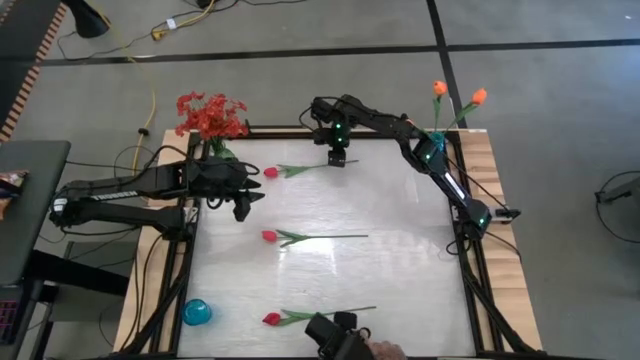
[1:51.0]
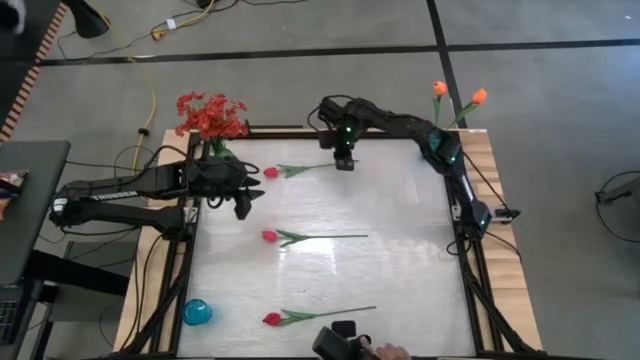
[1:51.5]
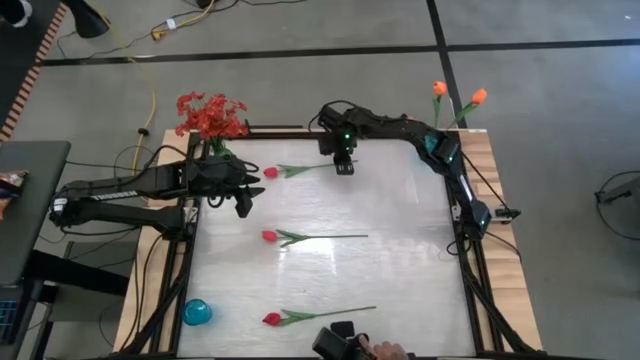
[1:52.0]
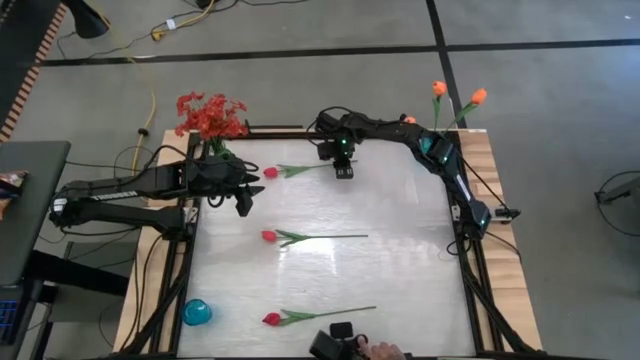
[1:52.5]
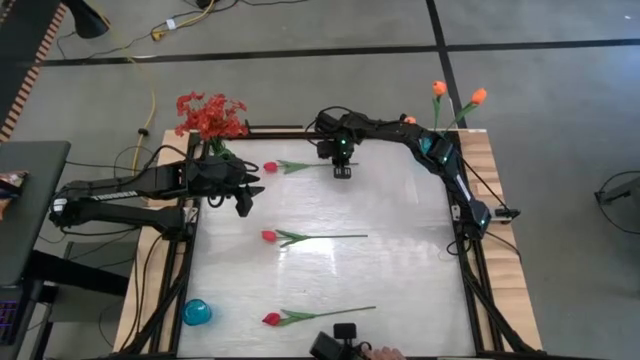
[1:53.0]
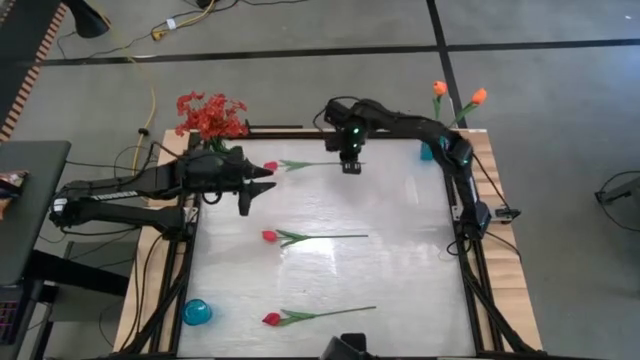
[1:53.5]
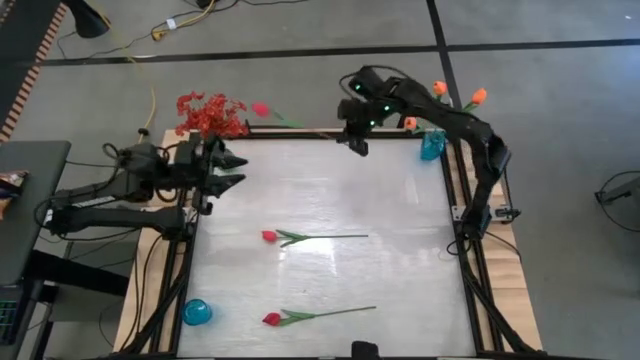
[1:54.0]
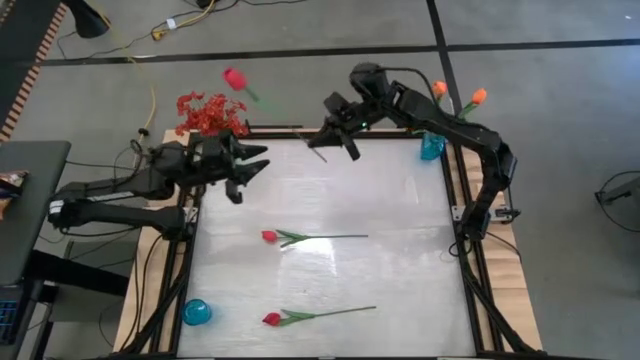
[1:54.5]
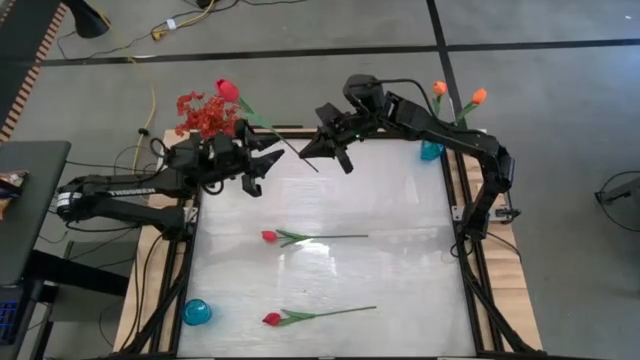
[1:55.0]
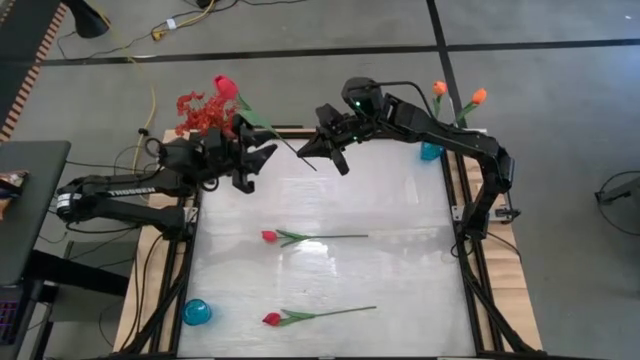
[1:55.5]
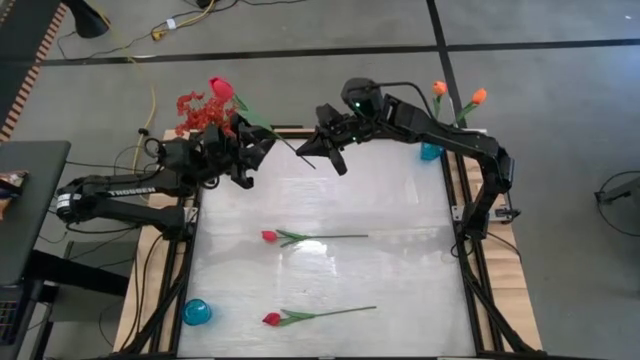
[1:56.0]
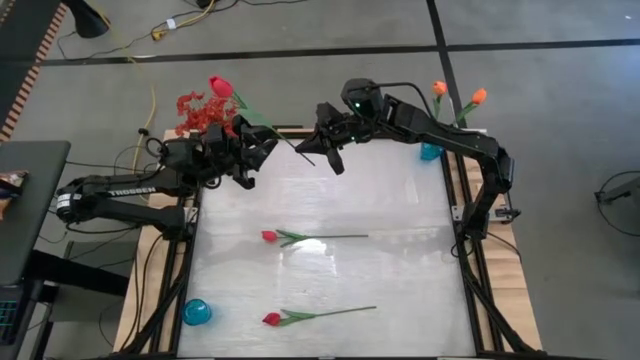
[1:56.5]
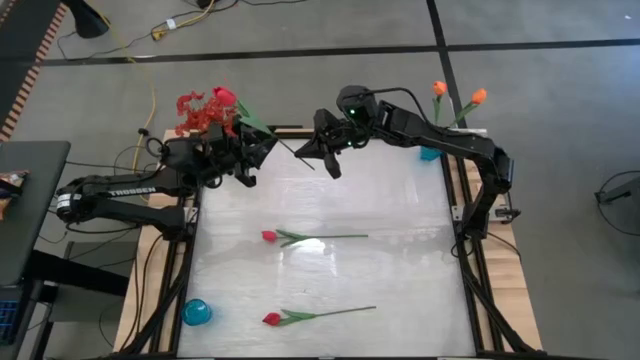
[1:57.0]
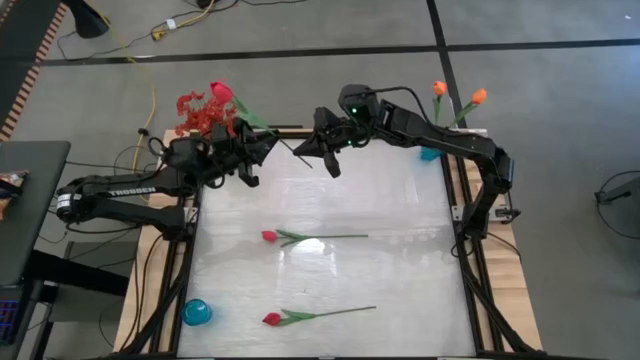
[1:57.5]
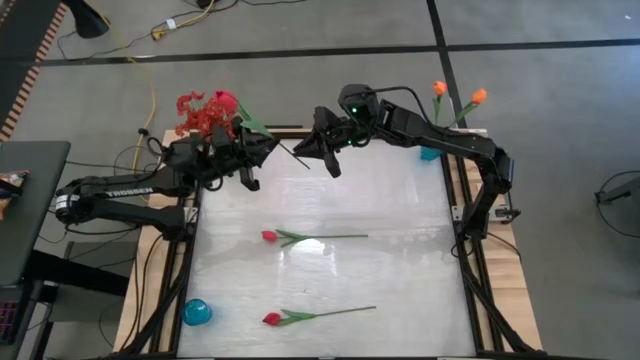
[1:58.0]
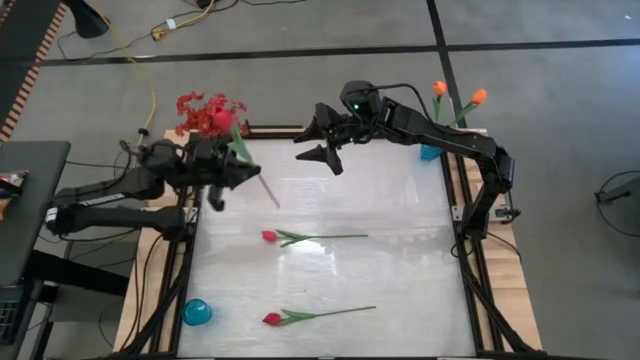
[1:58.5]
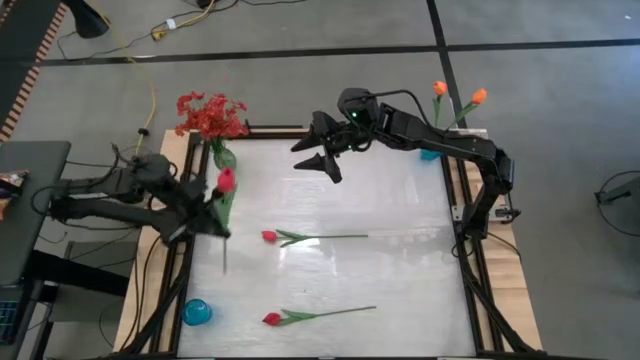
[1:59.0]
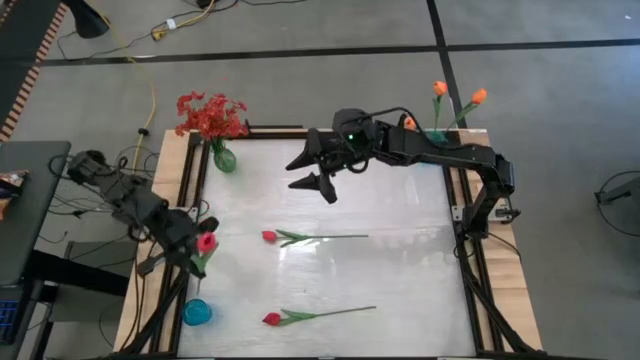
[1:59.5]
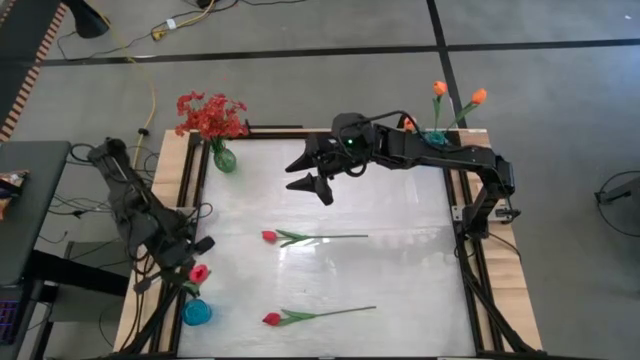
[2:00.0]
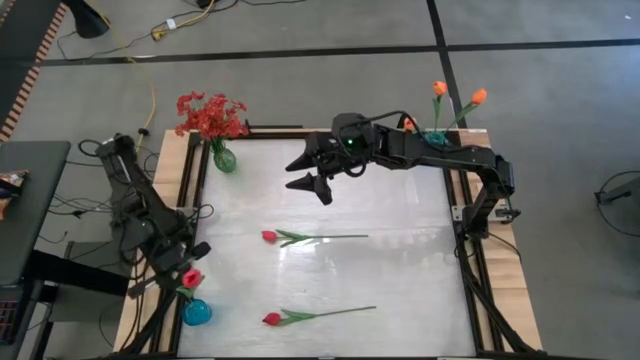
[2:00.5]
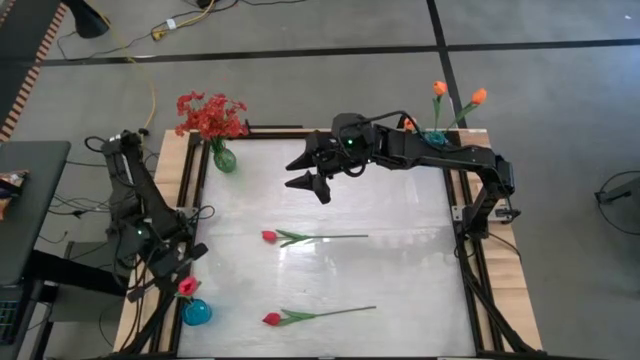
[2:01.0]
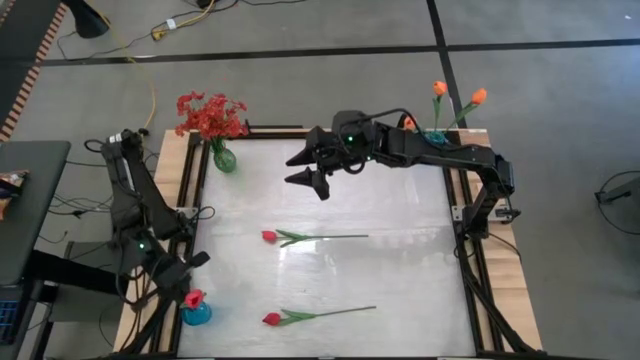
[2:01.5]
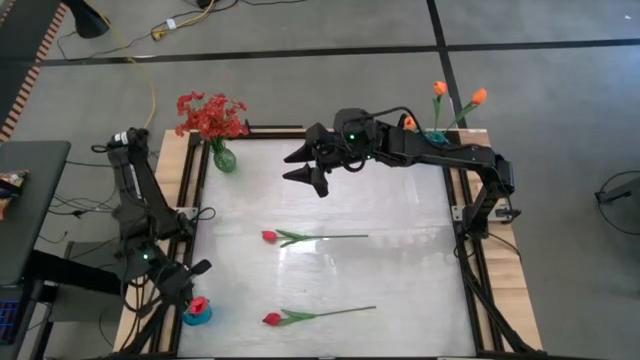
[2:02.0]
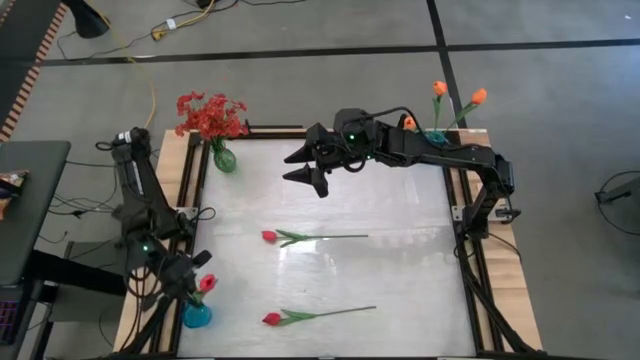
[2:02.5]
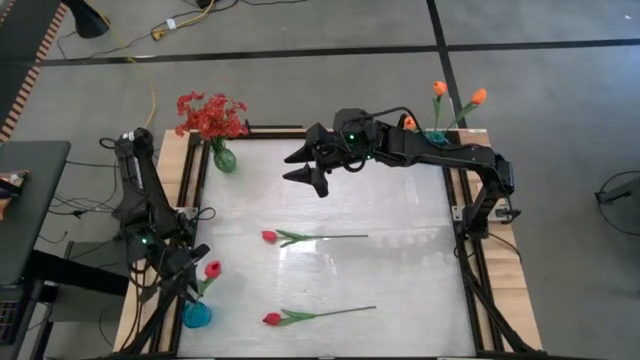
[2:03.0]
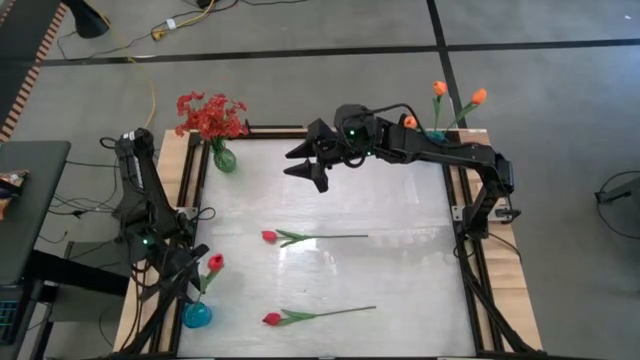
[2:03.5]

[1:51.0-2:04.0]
Task: Sort flowers into vase by color
Put the top center pink tulip into the bottom blue vase

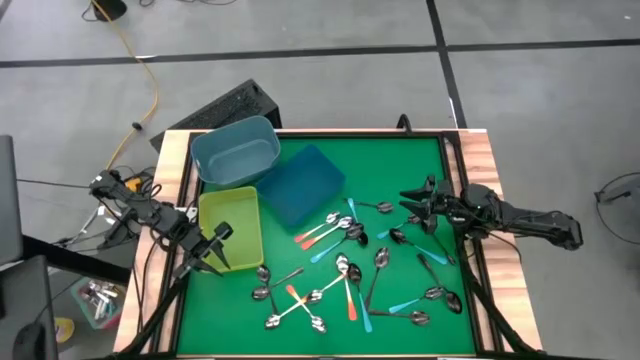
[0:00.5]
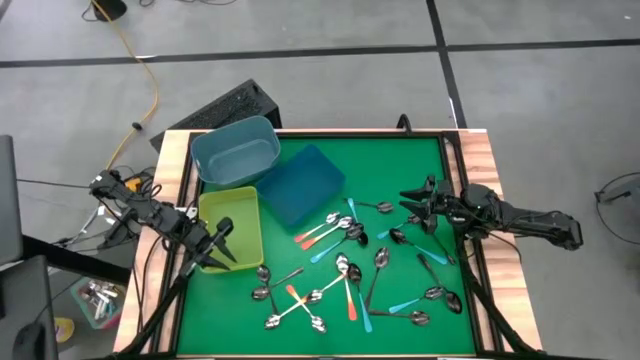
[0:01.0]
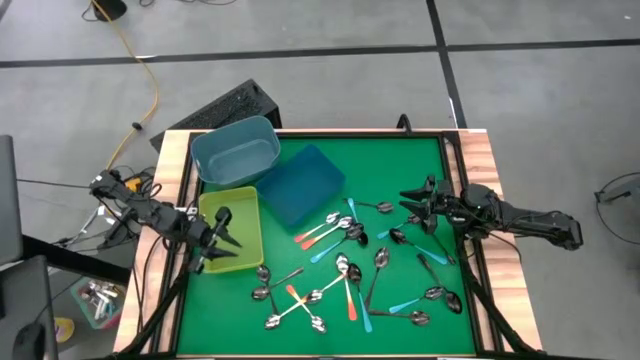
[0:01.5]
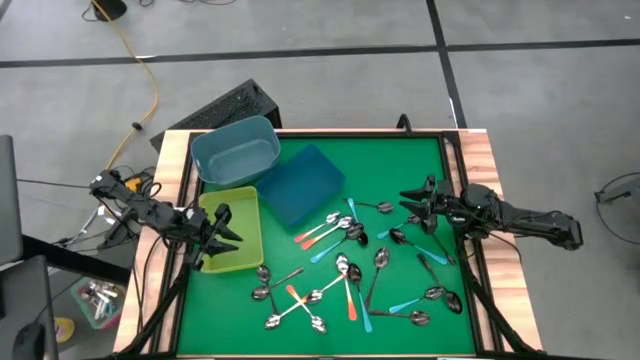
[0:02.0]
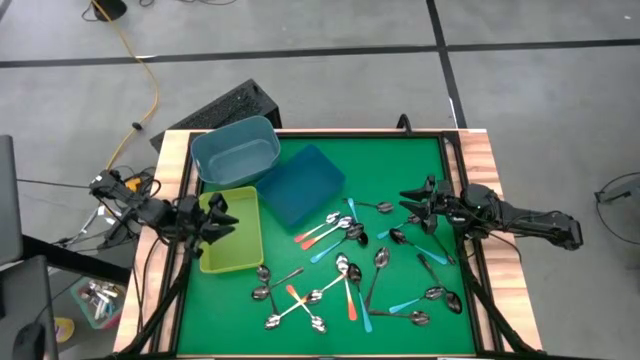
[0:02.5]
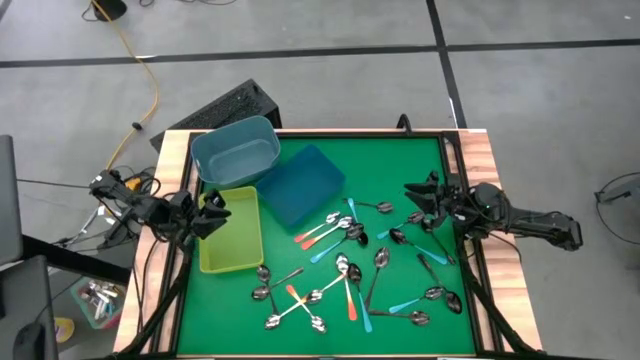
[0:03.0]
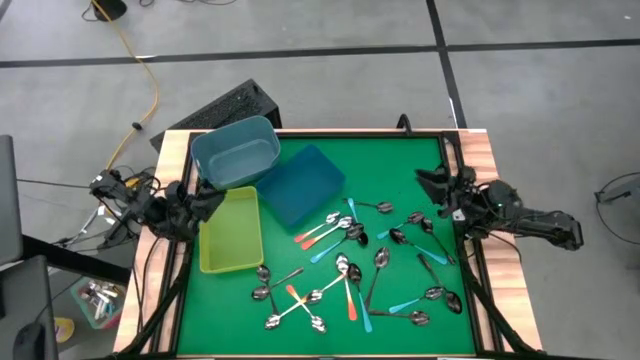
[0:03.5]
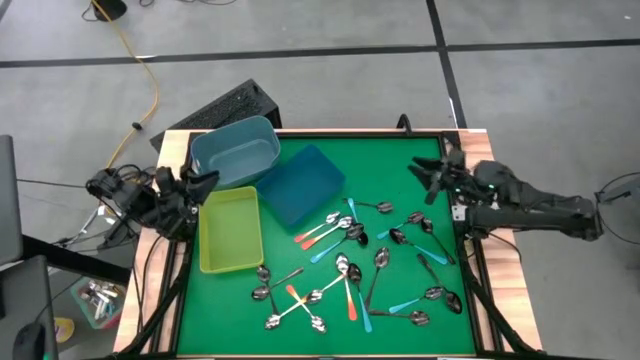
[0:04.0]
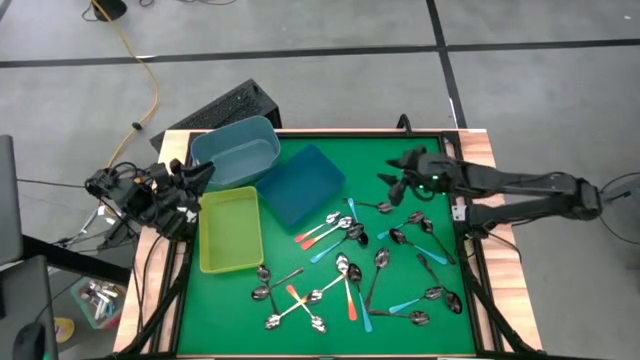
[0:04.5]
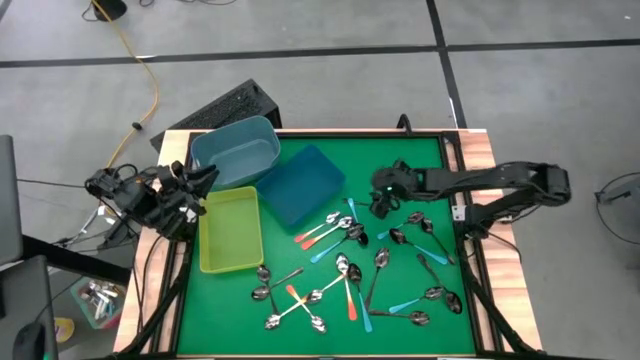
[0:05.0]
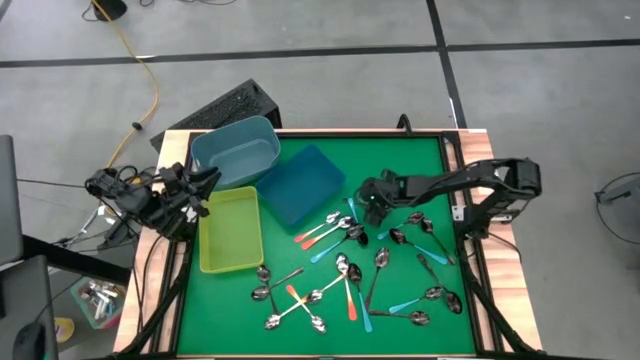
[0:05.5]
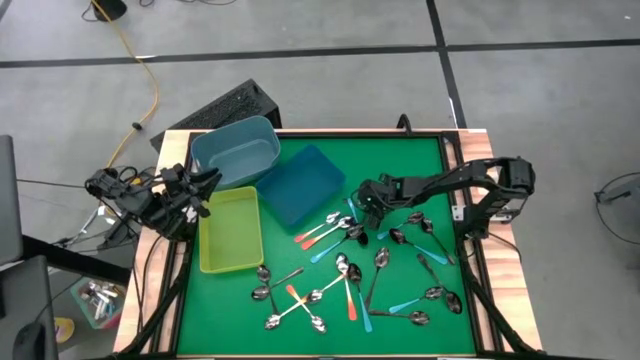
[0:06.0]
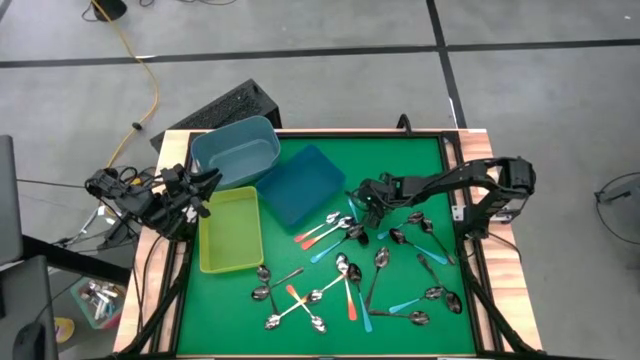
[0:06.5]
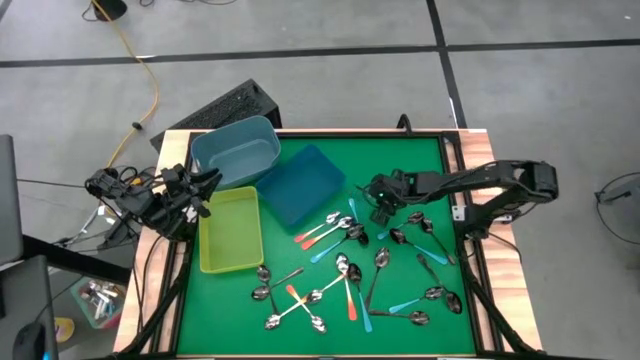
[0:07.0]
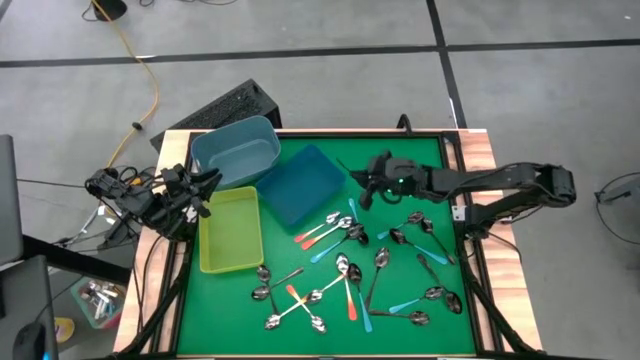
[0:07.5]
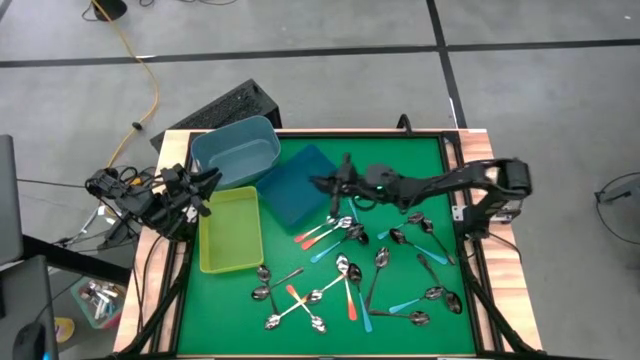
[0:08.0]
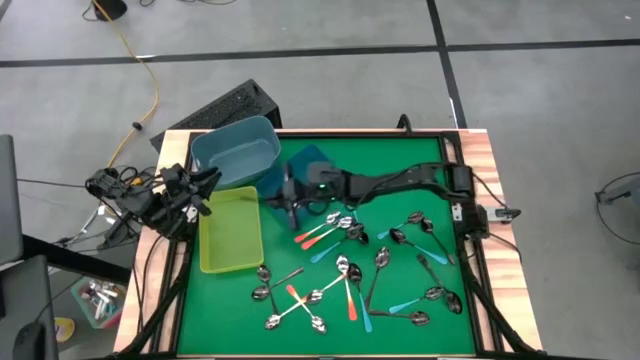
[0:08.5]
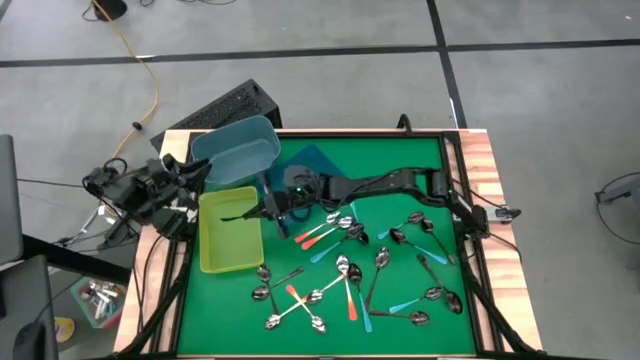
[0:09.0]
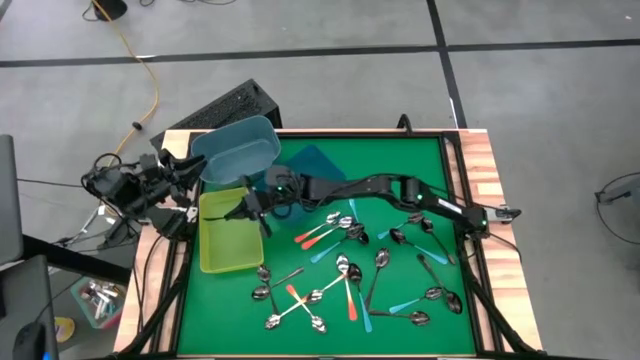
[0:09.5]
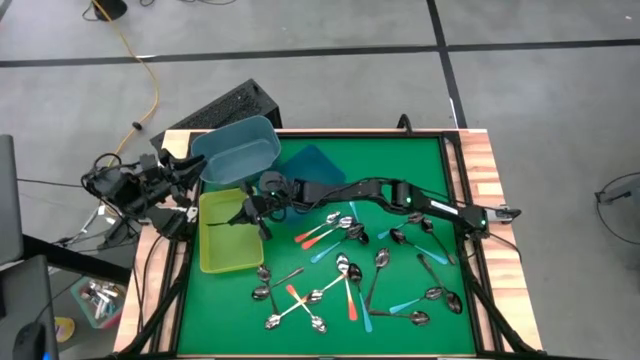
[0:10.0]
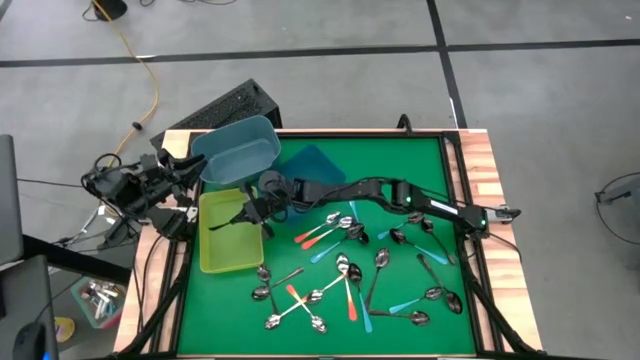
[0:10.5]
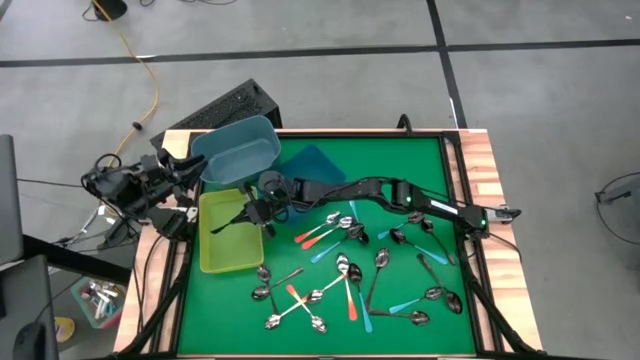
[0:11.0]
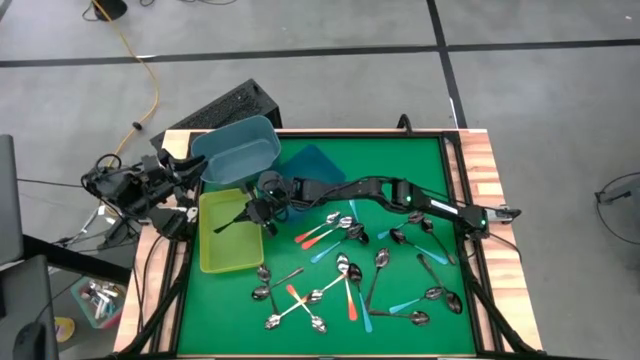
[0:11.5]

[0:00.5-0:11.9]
Task: Sort silverware by color (type)
Put the black spoon into the green bin
